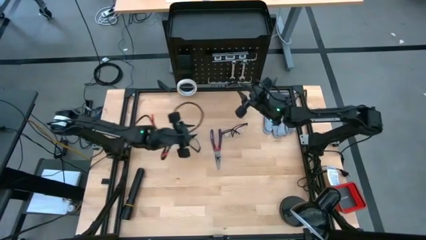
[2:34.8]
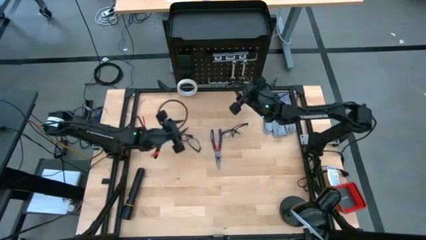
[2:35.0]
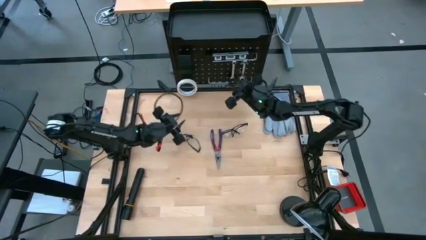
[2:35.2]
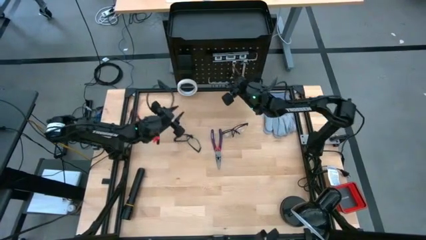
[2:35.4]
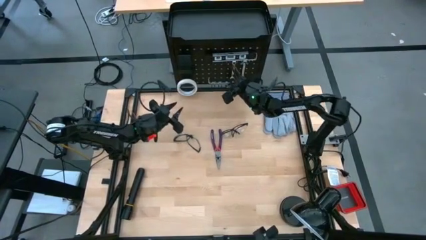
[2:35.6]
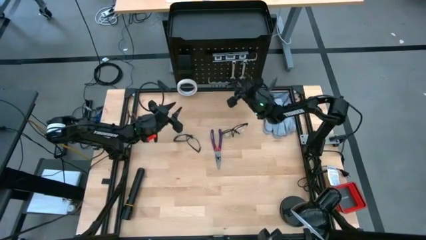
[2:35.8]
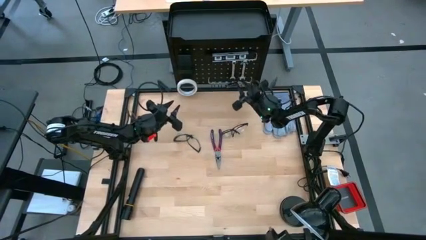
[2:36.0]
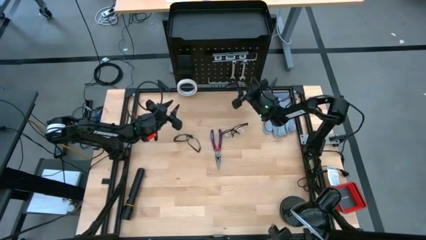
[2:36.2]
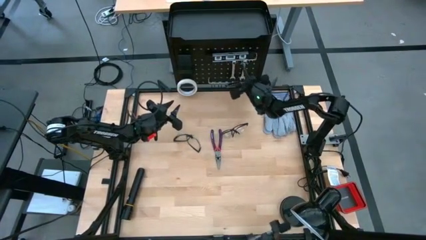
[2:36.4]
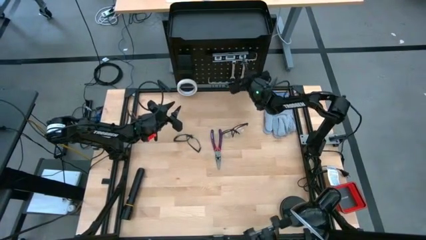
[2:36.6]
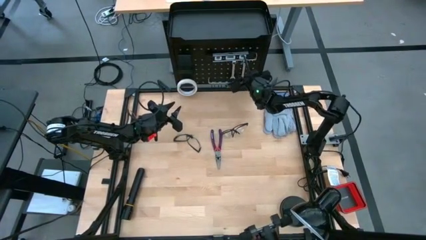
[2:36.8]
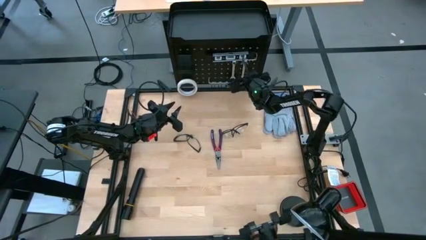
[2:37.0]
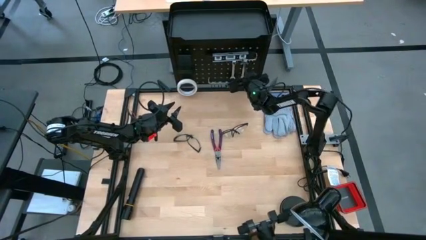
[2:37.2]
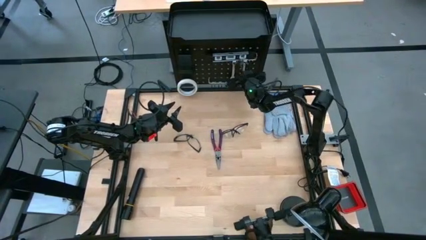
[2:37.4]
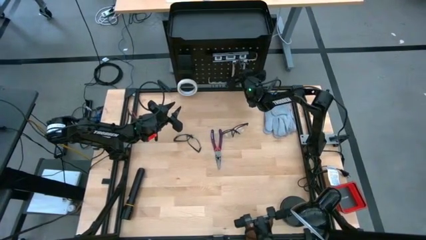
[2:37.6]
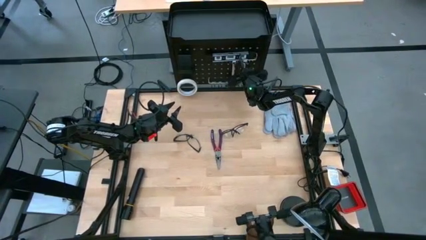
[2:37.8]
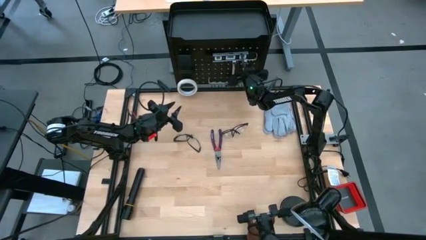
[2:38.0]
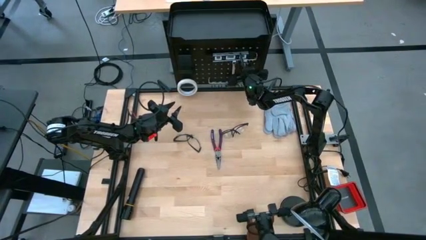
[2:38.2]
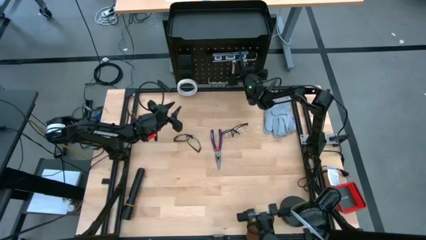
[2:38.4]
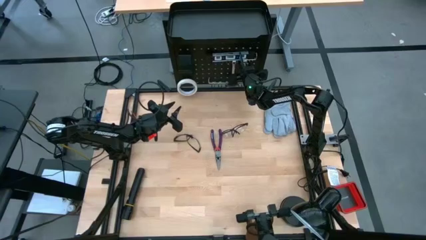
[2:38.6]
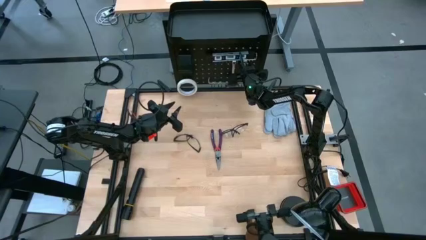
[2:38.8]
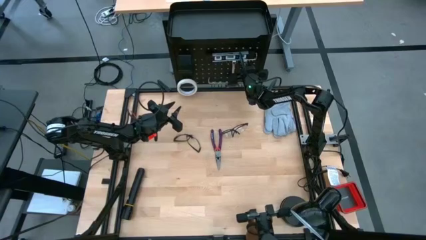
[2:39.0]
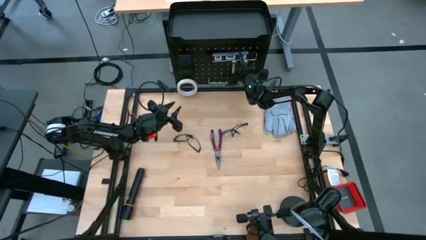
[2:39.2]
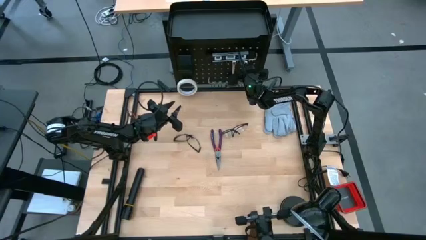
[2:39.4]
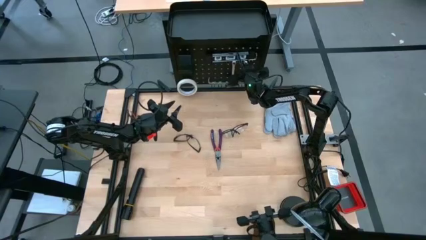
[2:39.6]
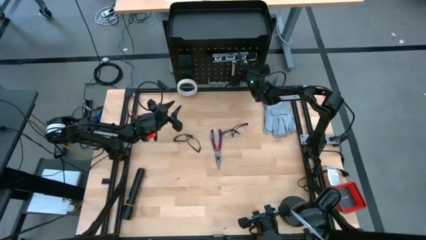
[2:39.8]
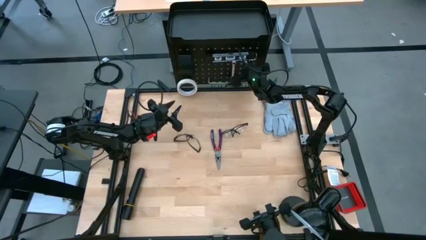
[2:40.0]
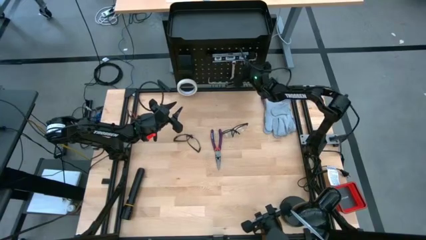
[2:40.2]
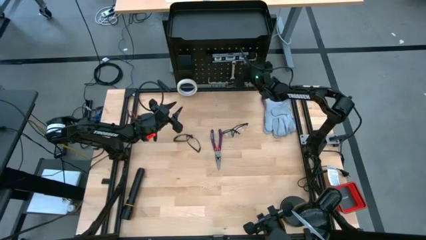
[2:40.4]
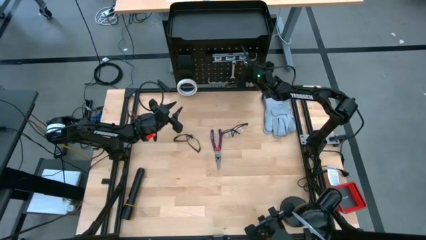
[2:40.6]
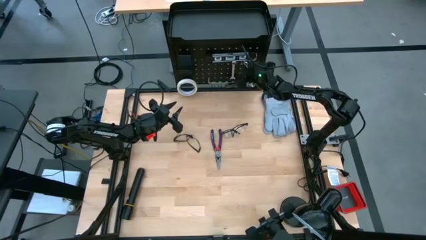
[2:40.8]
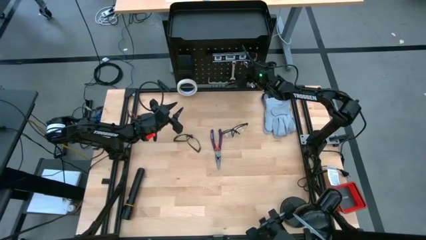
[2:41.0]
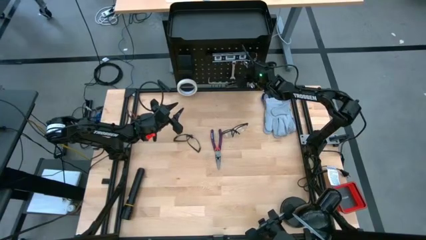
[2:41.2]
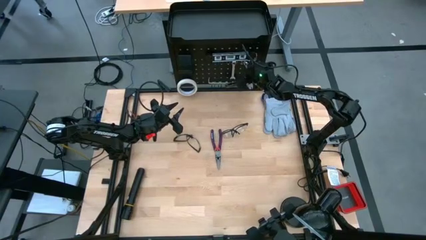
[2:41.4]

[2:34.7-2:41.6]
Task: Hang tools onto peg board
Unhang the silver wrench from the black pegboard

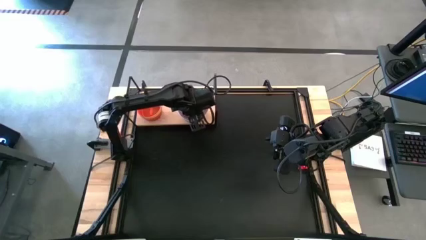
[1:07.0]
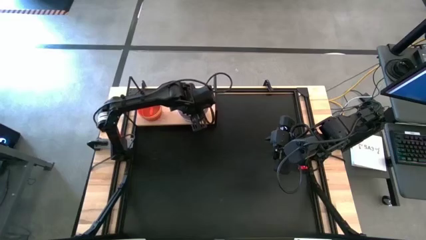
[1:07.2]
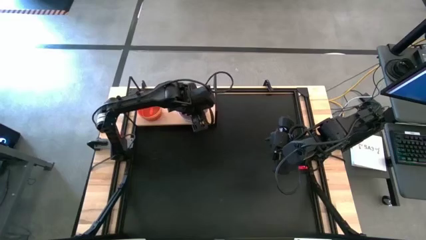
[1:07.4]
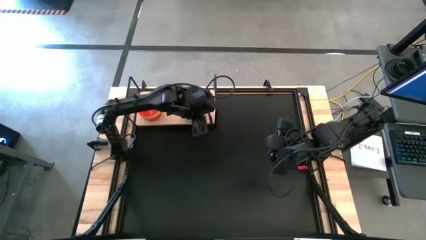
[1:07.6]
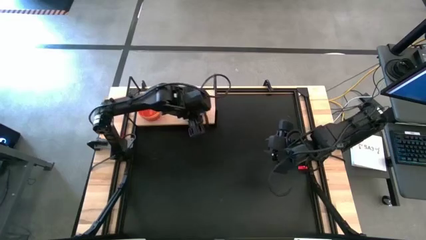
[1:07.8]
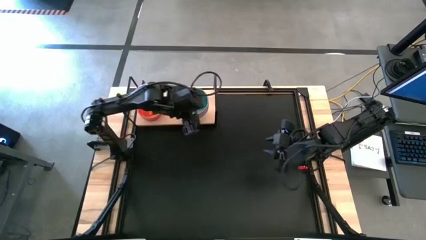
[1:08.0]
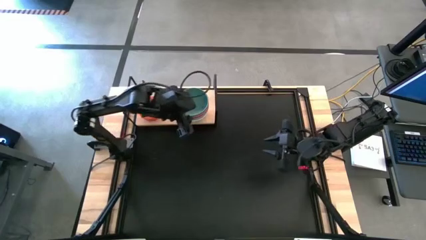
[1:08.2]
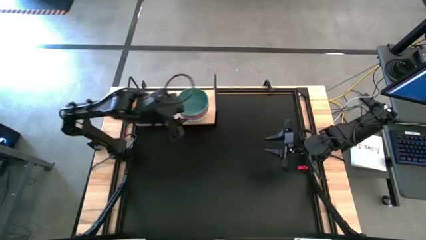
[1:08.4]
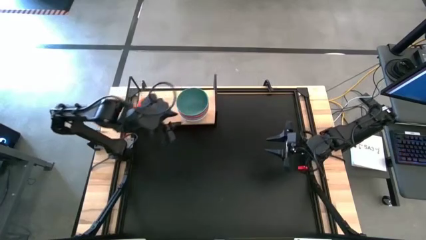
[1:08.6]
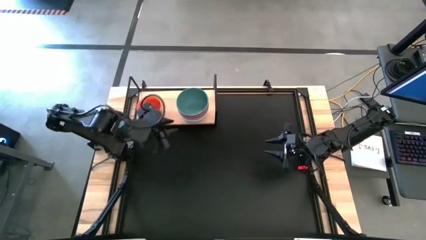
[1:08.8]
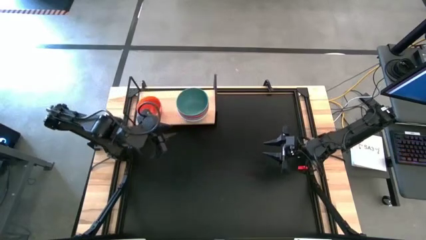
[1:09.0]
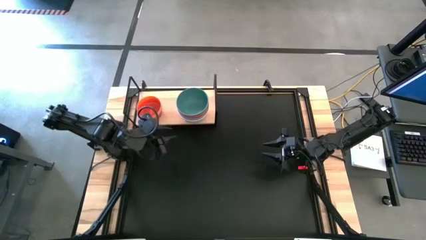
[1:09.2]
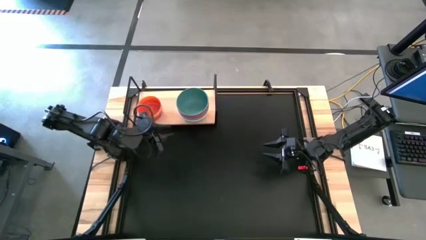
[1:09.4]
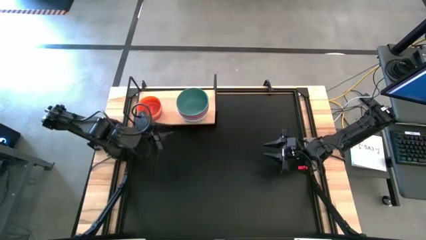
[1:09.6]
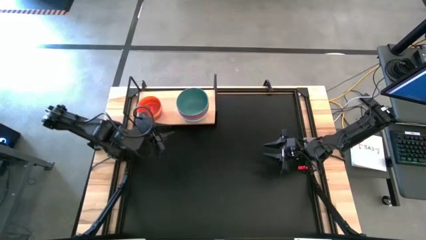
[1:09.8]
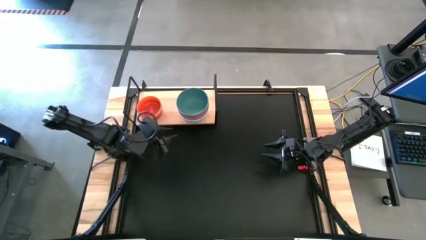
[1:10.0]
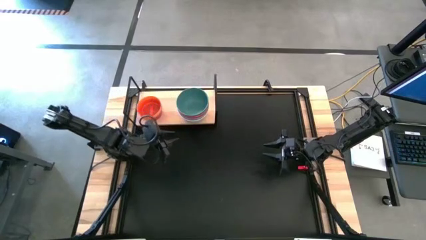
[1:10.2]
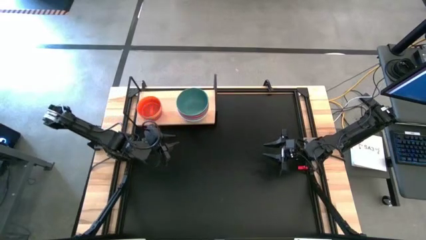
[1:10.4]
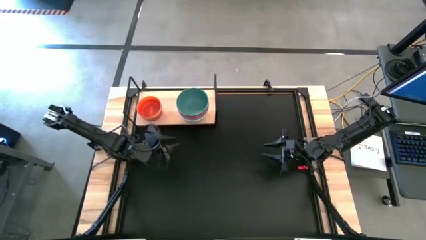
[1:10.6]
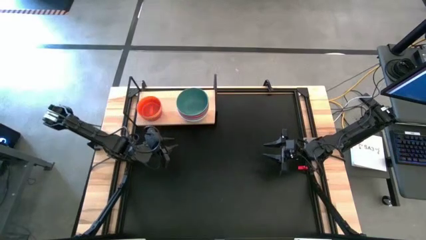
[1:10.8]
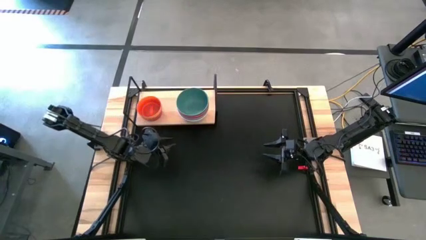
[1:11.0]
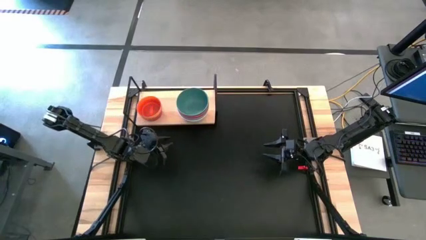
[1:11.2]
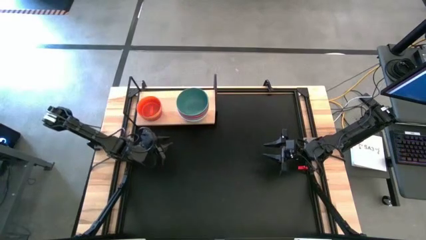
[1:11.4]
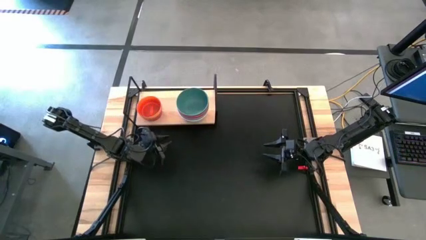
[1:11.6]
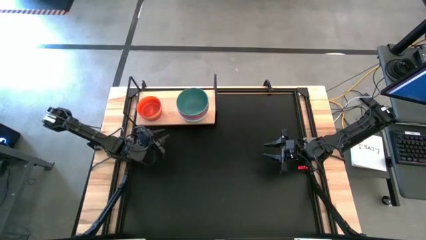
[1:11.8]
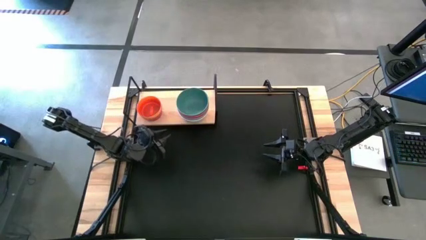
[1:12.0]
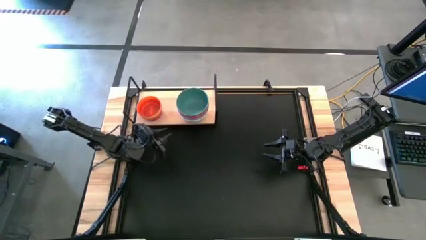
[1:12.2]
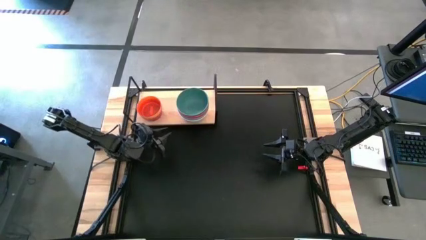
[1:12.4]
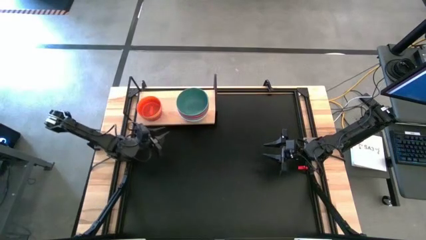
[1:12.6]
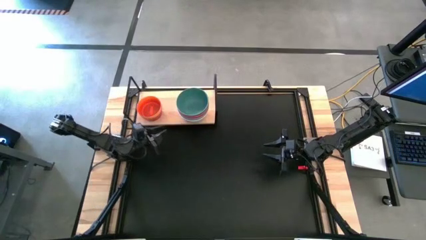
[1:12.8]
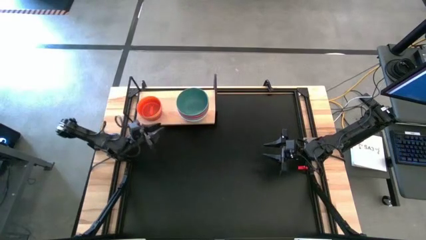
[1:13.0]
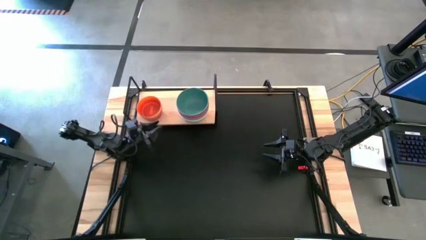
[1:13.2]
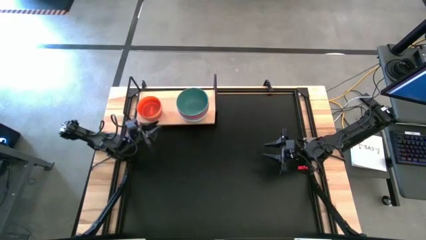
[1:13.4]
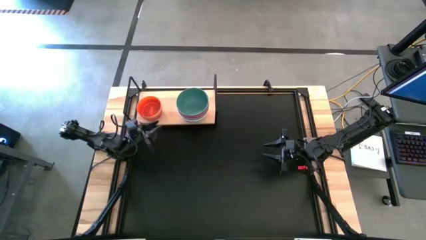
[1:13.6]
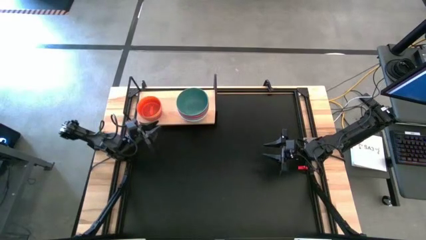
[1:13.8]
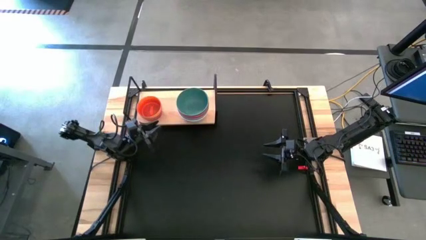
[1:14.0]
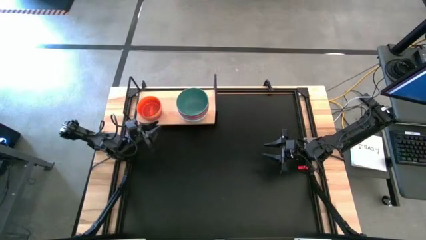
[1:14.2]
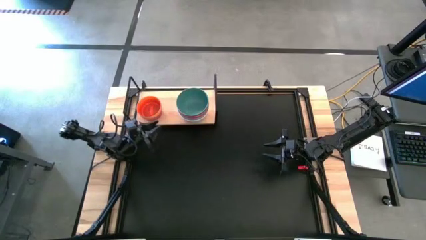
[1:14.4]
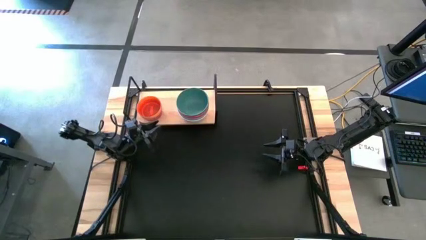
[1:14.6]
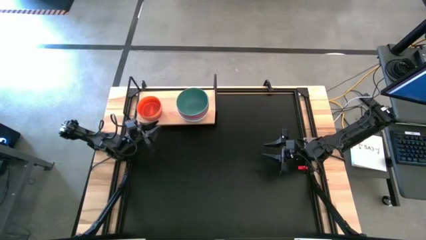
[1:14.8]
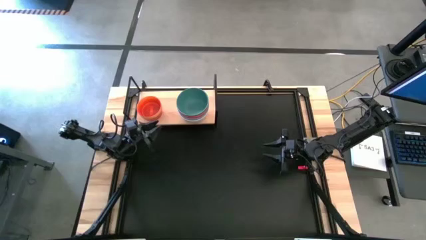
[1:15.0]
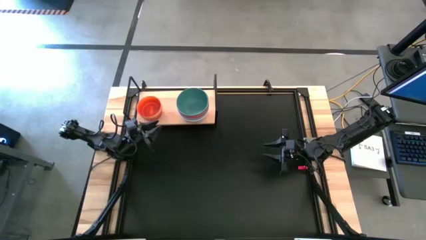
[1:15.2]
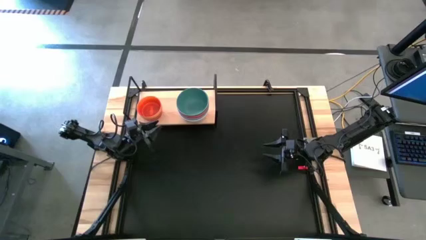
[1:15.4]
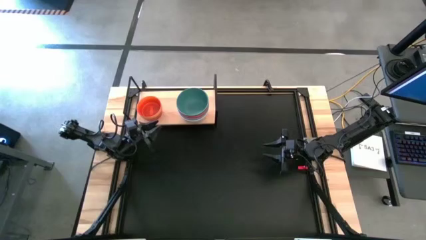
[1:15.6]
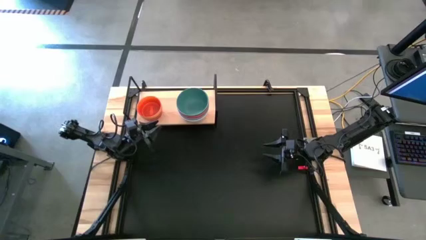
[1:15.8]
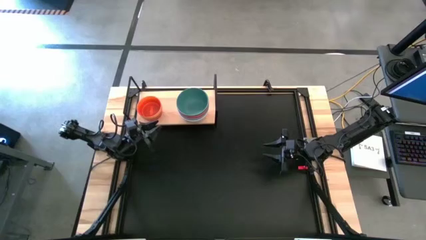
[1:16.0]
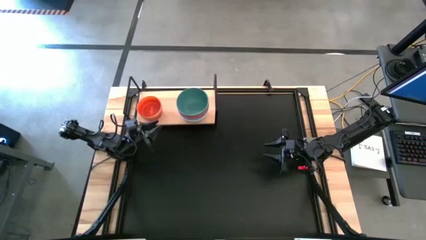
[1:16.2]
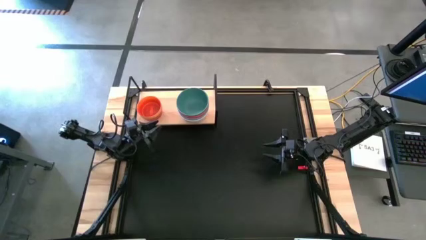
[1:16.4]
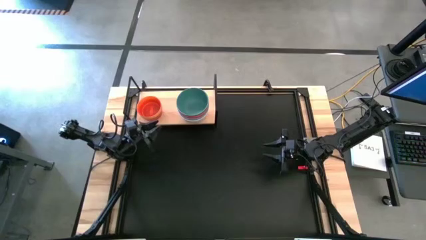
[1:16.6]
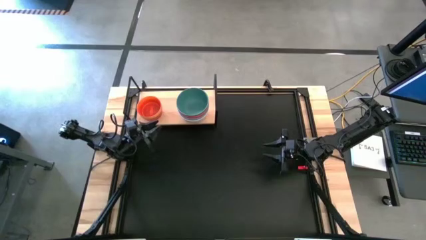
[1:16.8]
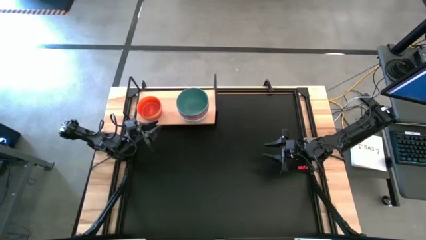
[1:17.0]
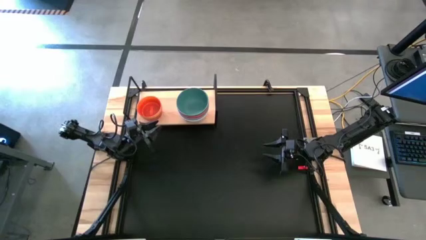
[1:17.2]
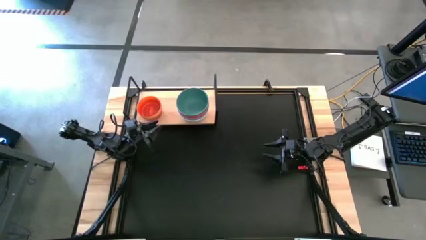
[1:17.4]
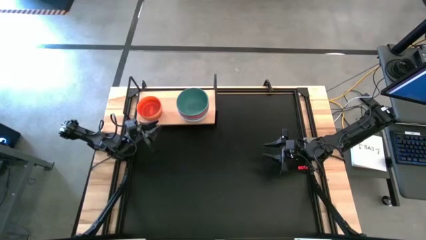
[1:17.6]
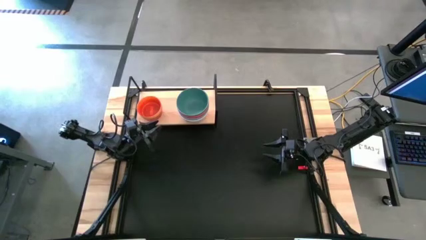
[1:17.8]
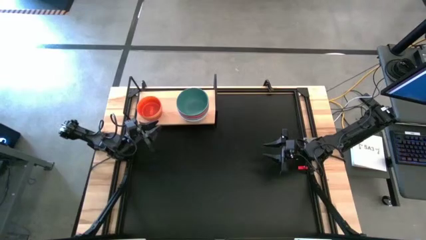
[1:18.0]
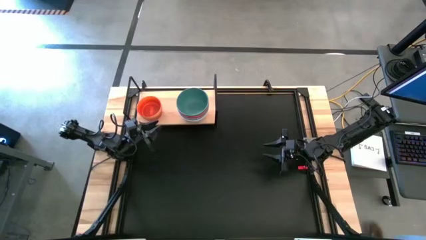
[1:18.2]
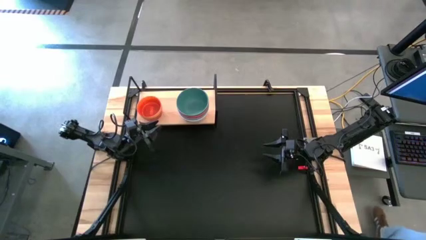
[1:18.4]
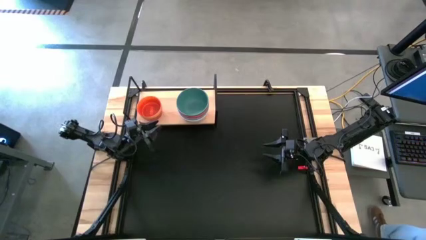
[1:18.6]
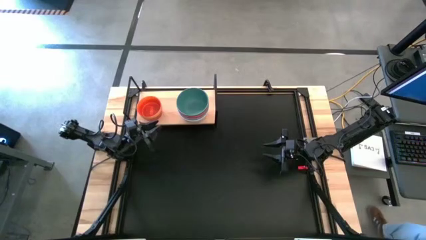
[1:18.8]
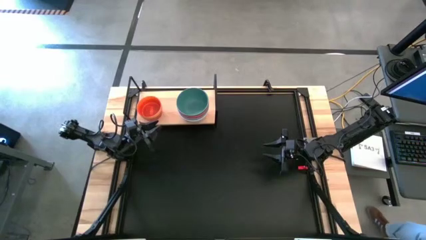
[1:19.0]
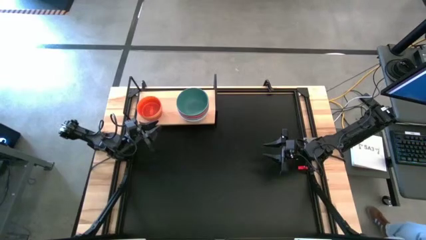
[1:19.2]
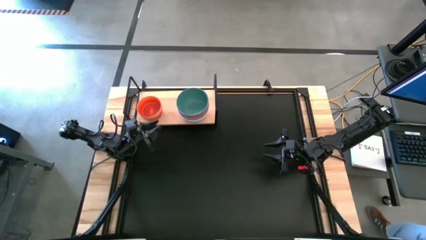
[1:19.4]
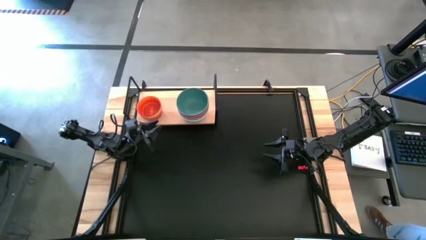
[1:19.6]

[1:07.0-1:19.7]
Task: Place and stack bowls onto a shelf
Return to Home Position
